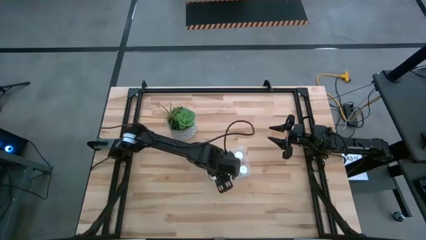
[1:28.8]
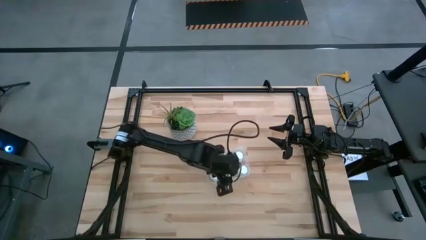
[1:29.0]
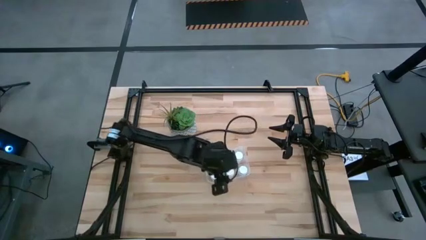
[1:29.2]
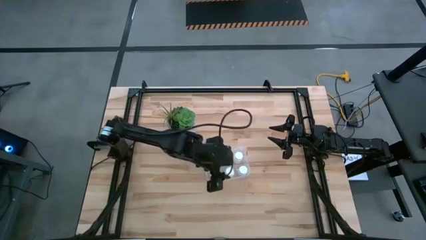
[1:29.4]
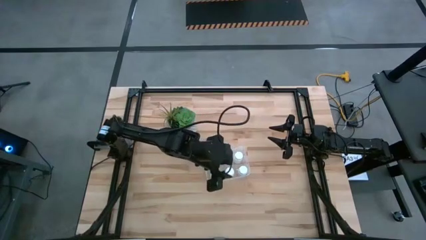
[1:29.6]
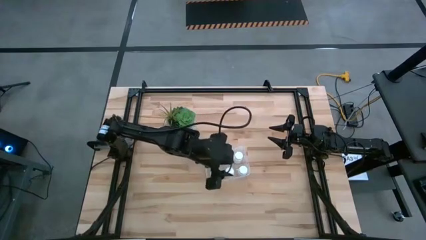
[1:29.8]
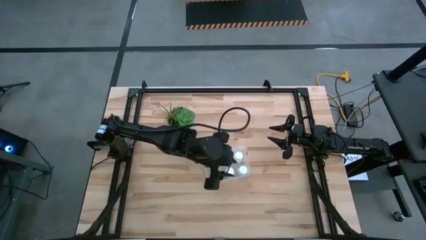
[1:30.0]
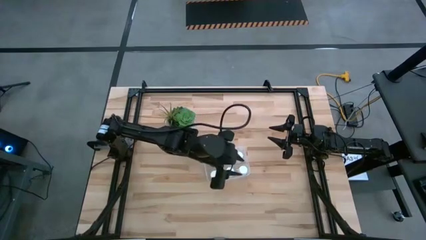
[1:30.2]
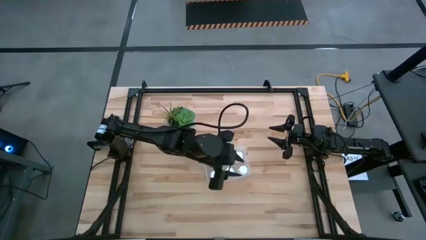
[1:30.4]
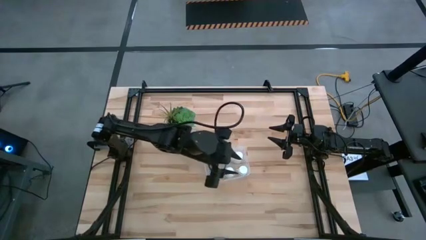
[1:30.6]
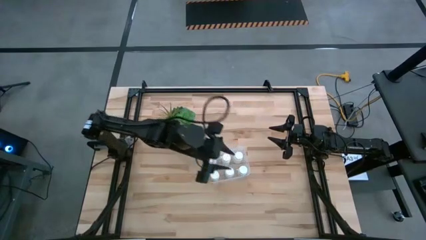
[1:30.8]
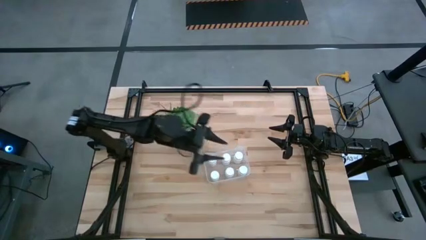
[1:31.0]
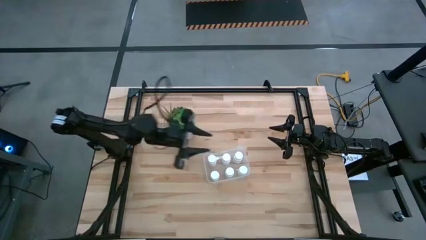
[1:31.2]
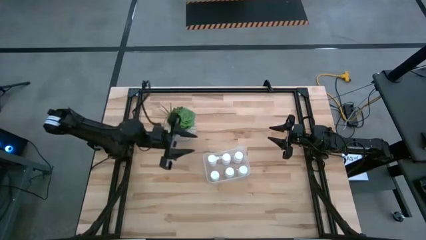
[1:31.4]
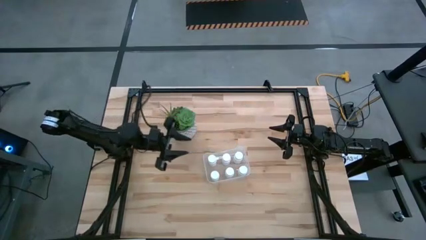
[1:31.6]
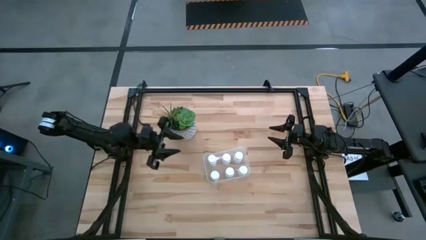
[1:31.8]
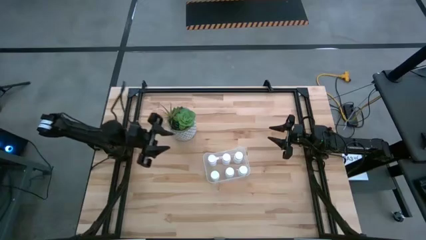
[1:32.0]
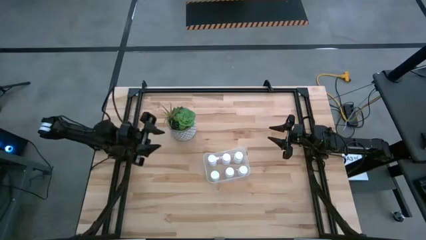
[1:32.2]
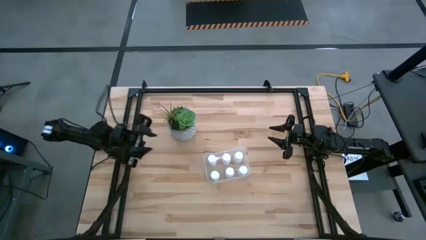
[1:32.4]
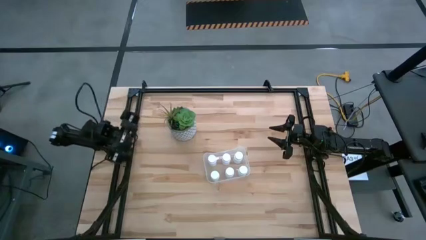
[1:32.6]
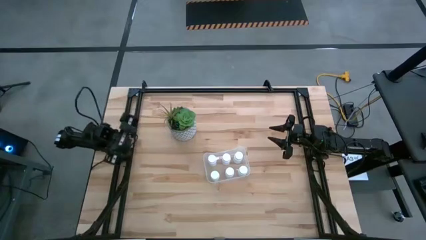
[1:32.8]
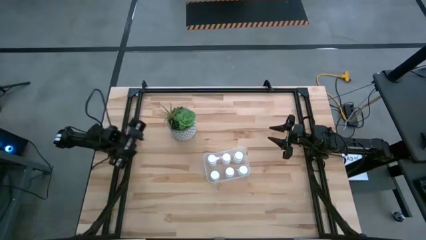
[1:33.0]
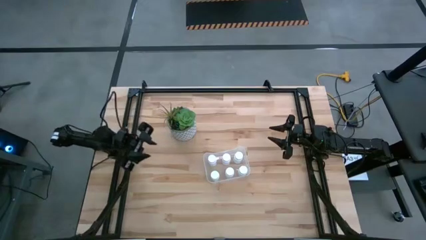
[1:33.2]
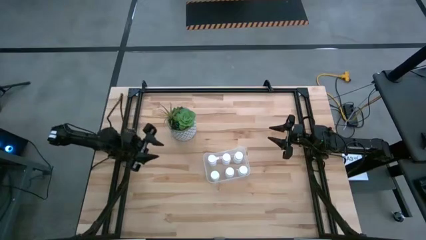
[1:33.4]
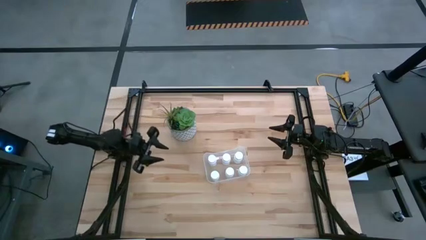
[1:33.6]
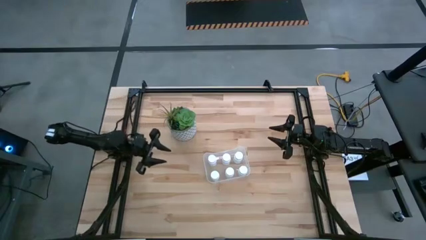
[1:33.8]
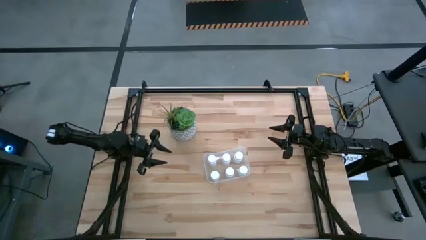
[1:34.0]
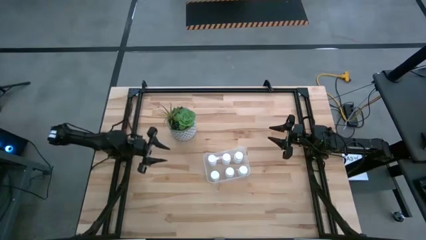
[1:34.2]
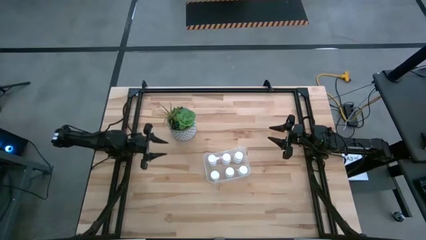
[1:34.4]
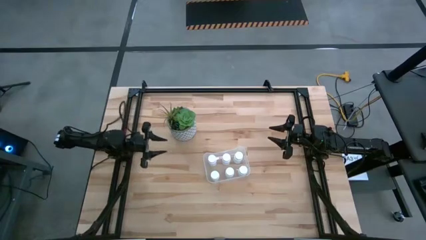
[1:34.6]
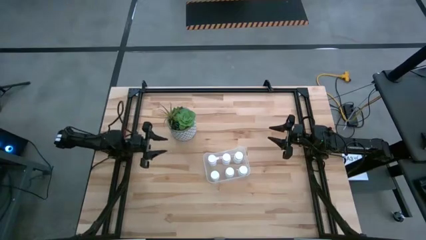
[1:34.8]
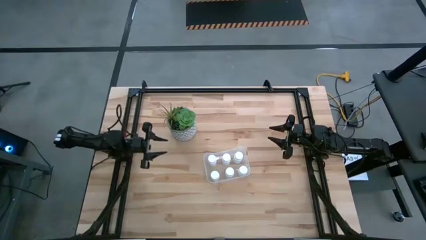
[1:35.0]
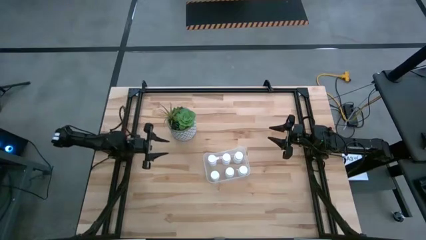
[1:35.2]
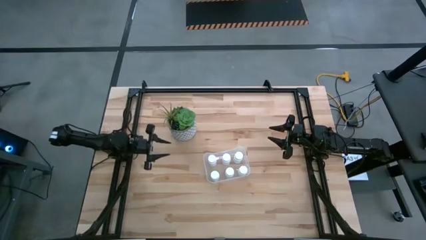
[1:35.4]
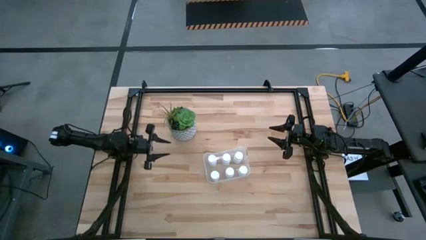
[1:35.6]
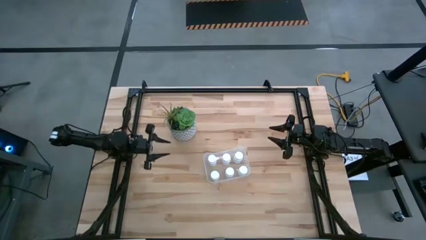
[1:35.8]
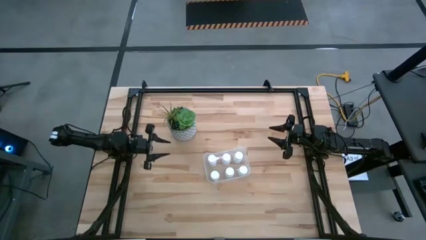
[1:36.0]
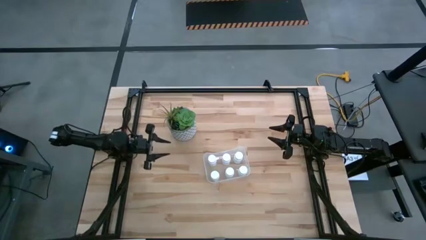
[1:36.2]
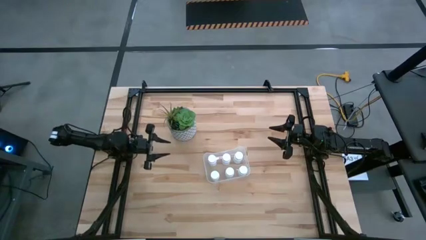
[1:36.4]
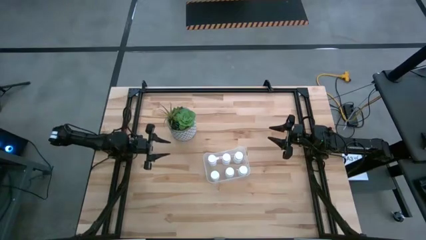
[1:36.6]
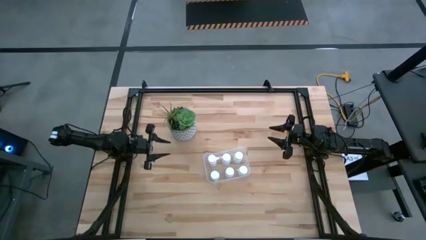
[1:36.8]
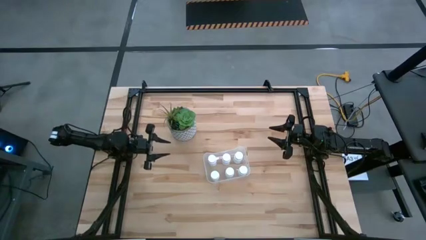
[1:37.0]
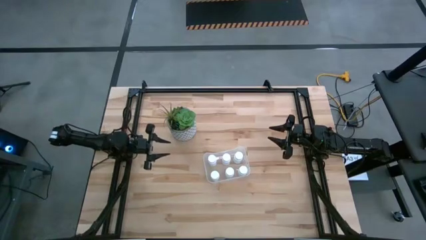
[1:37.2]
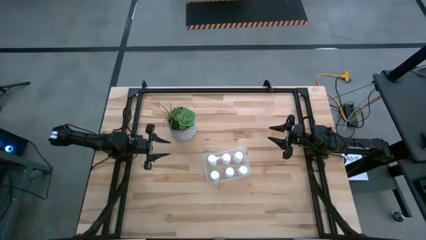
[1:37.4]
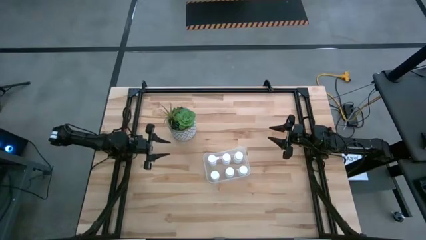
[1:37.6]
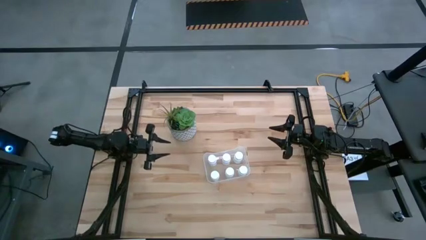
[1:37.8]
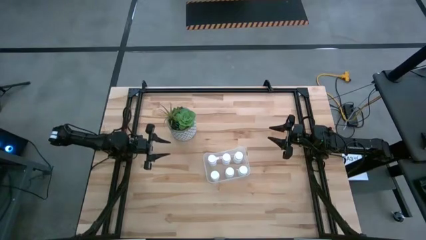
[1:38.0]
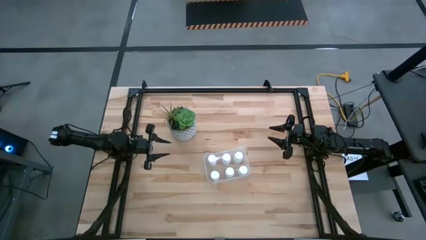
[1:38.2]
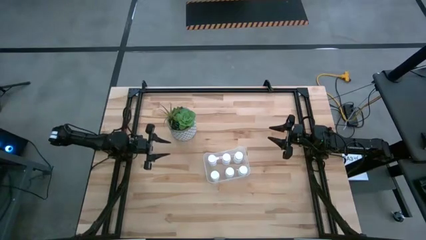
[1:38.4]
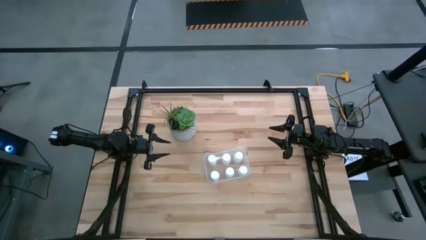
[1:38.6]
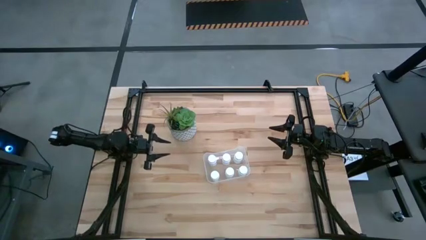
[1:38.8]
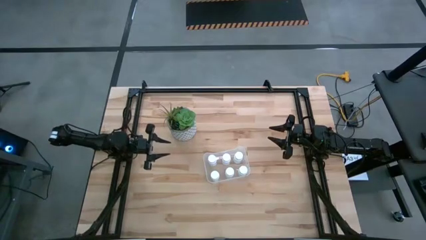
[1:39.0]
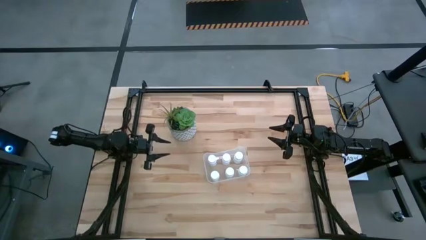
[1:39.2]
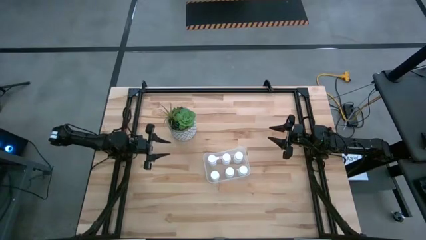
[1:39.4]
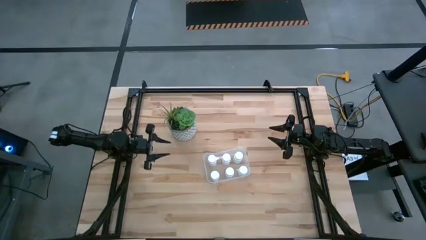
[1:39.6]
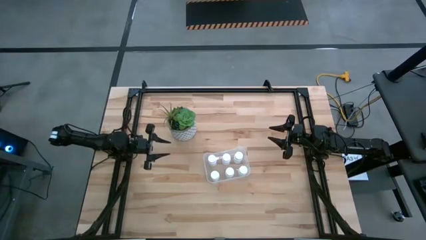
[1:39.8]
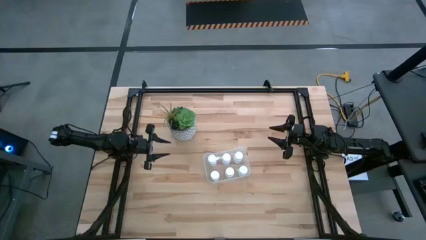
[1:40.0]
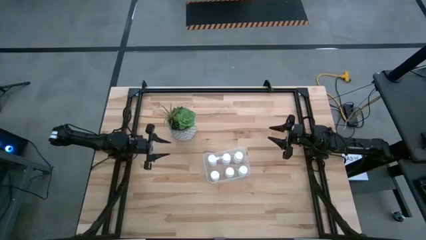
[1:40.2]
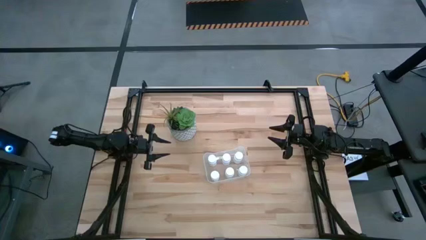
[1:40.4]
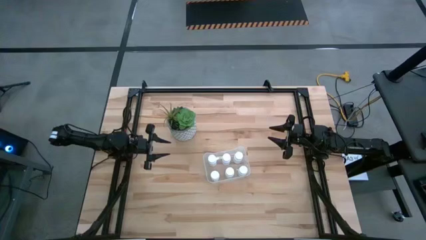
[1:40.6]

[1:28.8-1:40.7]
Task: Pick and place pill bottles into a basket
Return to Home Position
